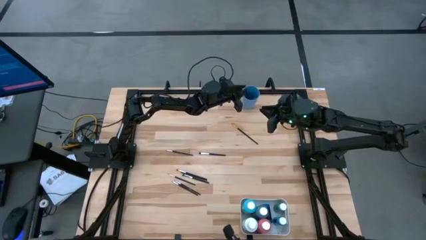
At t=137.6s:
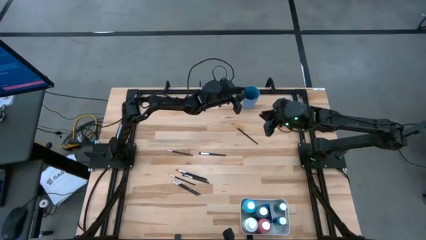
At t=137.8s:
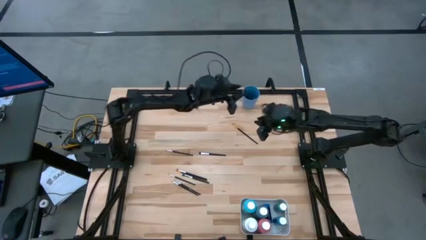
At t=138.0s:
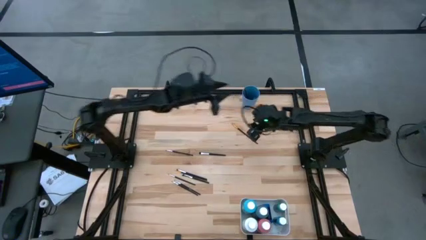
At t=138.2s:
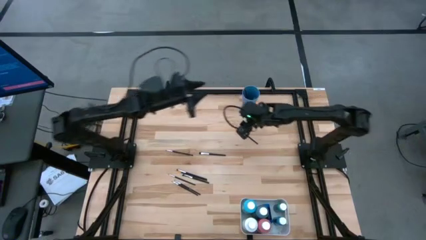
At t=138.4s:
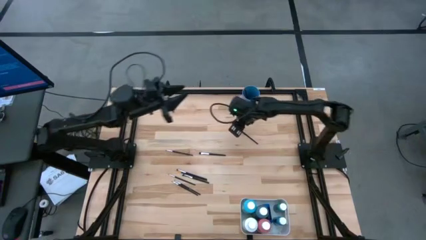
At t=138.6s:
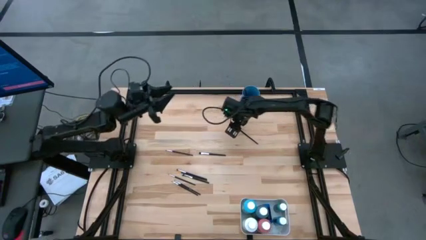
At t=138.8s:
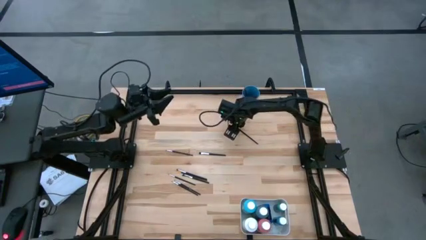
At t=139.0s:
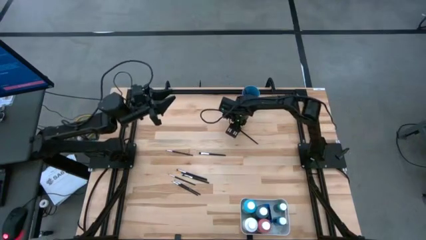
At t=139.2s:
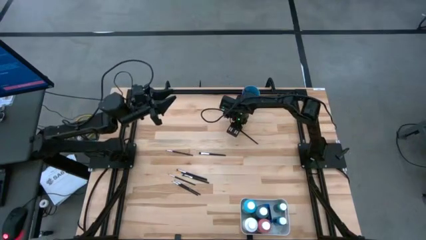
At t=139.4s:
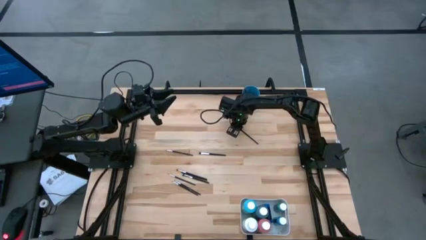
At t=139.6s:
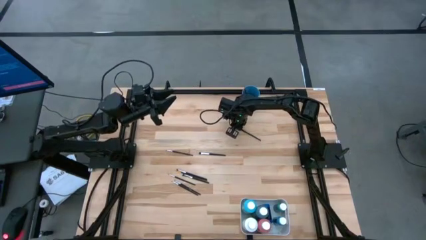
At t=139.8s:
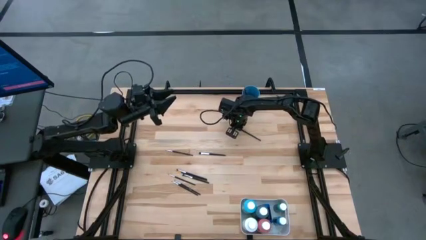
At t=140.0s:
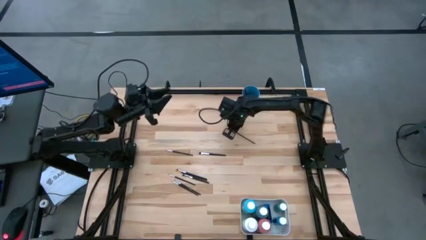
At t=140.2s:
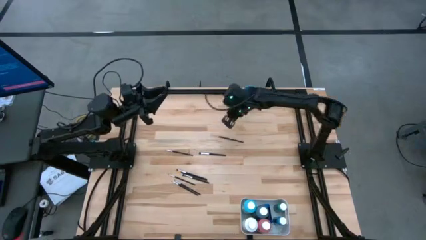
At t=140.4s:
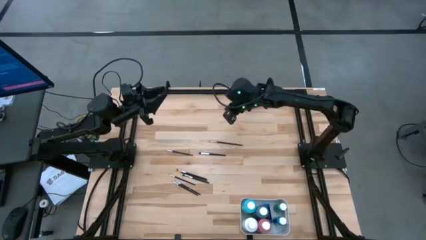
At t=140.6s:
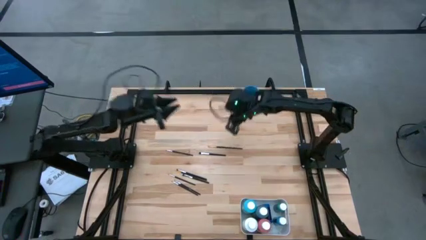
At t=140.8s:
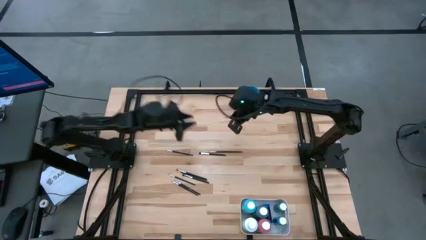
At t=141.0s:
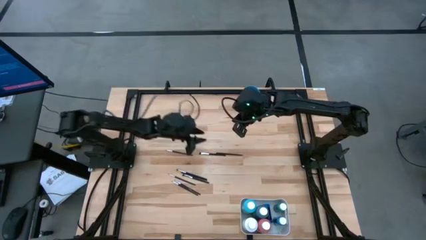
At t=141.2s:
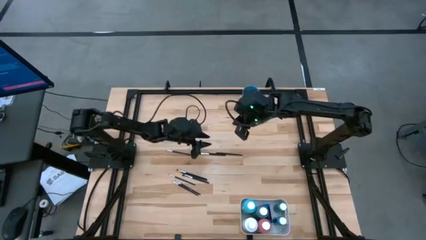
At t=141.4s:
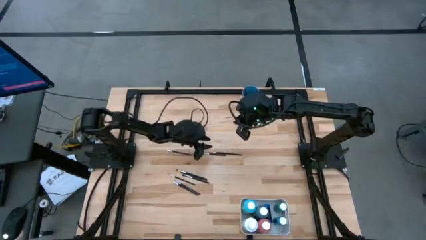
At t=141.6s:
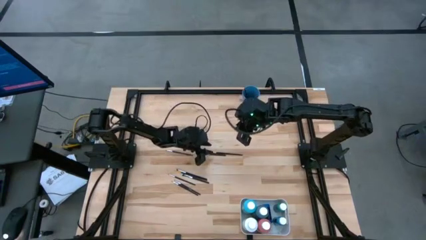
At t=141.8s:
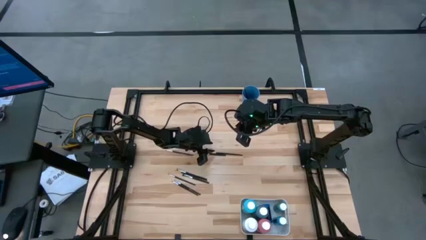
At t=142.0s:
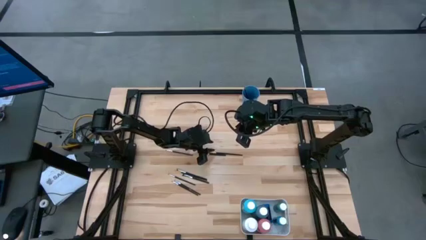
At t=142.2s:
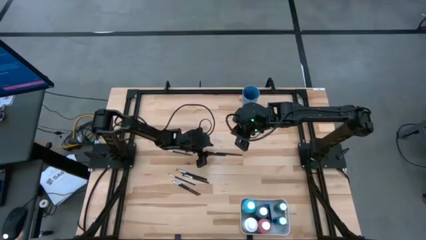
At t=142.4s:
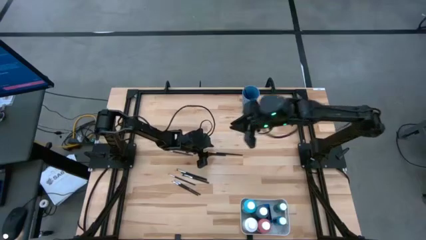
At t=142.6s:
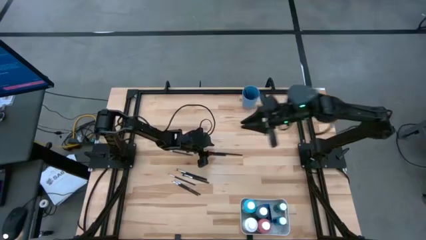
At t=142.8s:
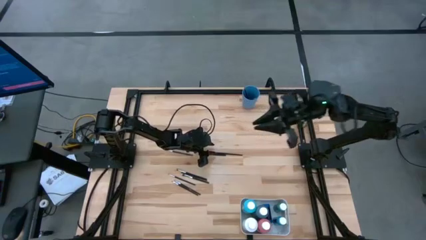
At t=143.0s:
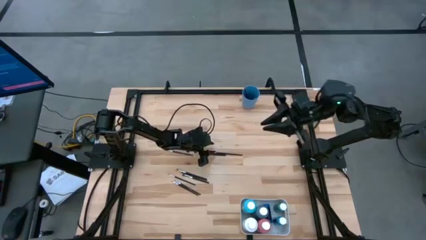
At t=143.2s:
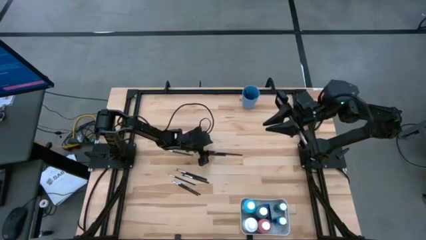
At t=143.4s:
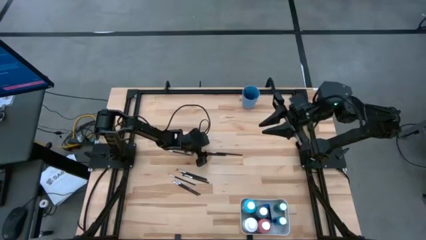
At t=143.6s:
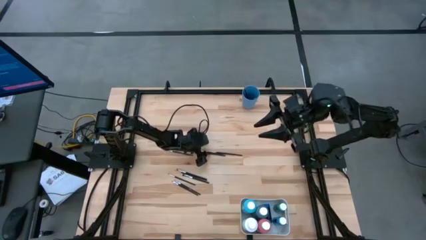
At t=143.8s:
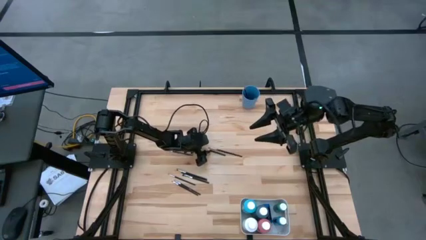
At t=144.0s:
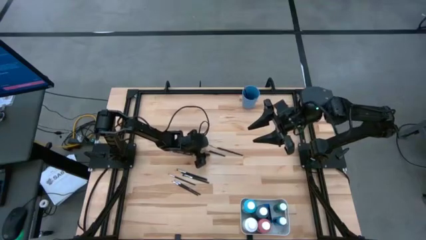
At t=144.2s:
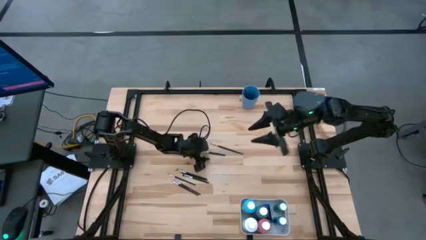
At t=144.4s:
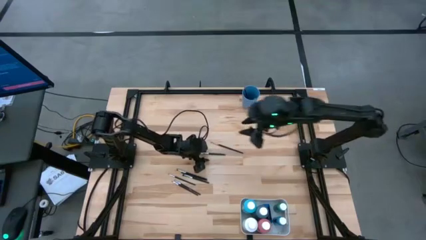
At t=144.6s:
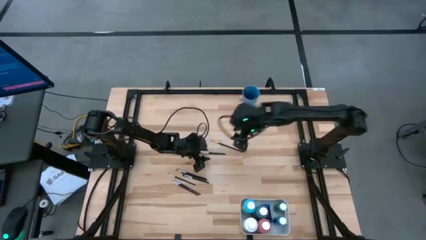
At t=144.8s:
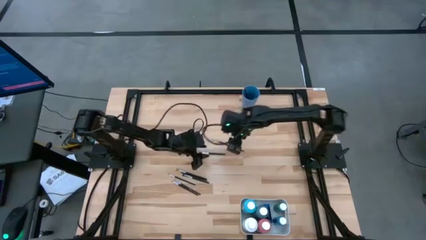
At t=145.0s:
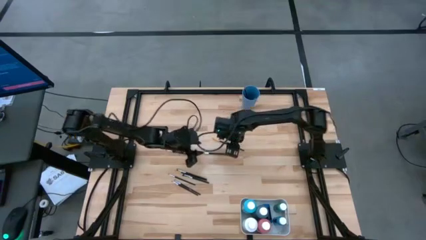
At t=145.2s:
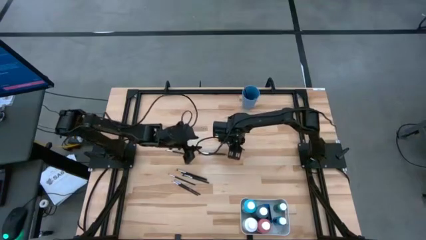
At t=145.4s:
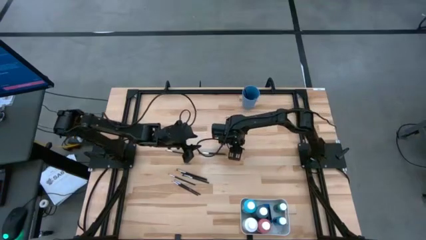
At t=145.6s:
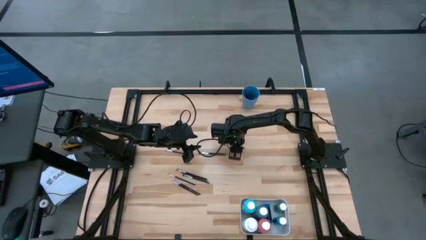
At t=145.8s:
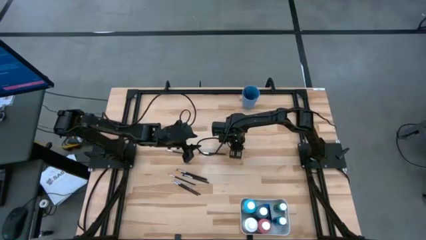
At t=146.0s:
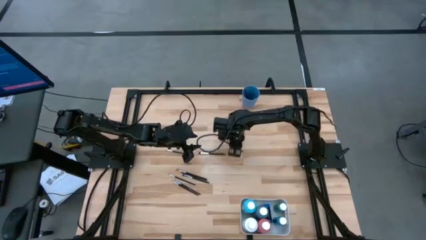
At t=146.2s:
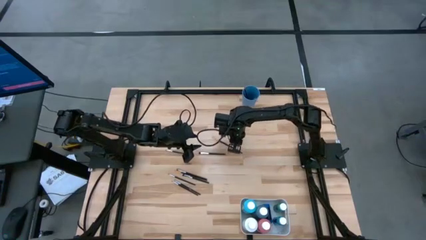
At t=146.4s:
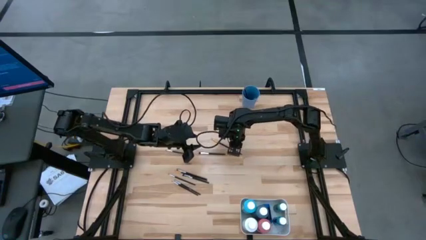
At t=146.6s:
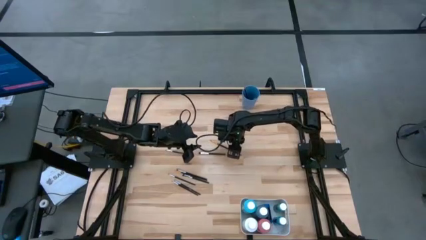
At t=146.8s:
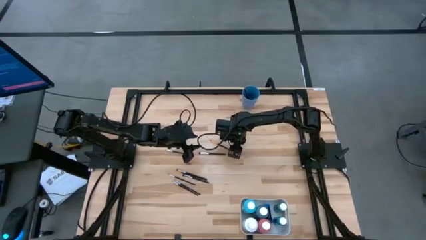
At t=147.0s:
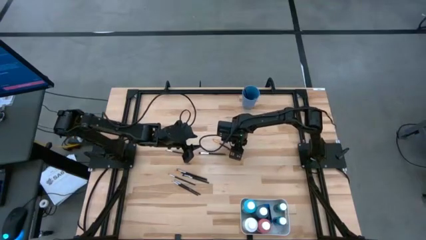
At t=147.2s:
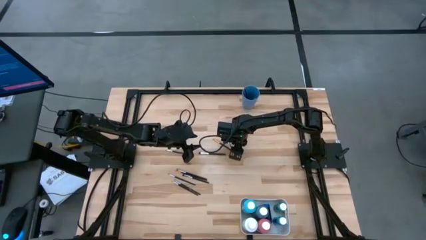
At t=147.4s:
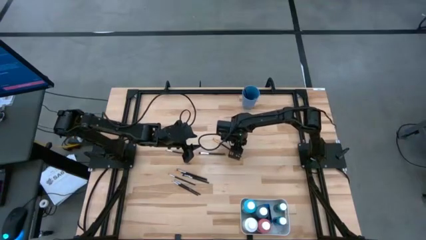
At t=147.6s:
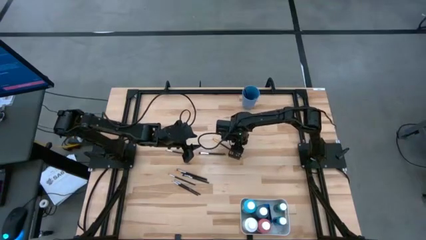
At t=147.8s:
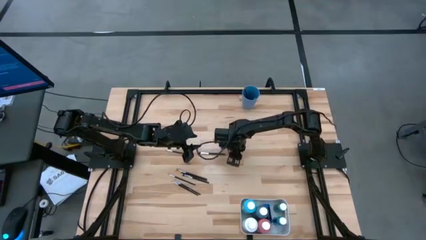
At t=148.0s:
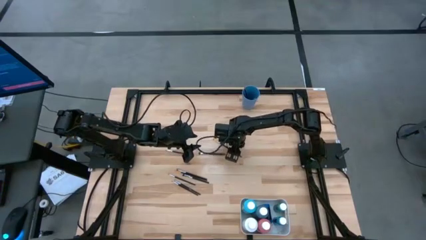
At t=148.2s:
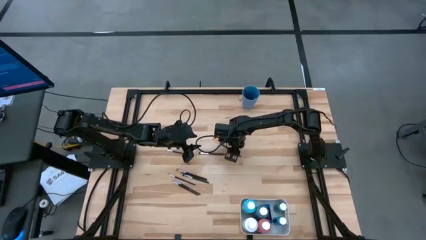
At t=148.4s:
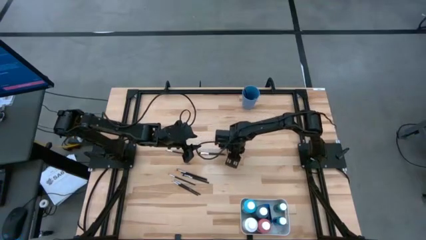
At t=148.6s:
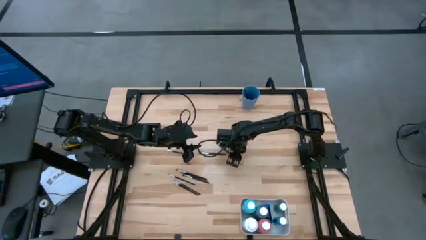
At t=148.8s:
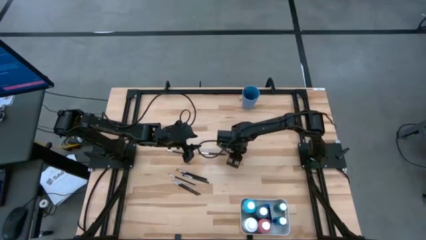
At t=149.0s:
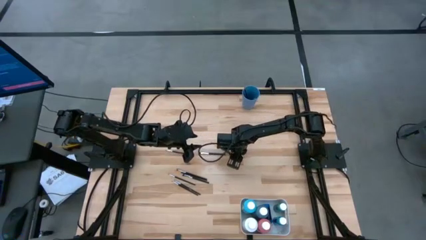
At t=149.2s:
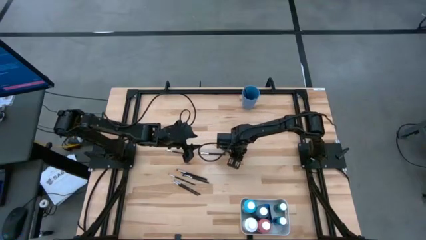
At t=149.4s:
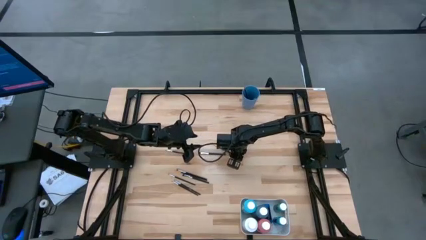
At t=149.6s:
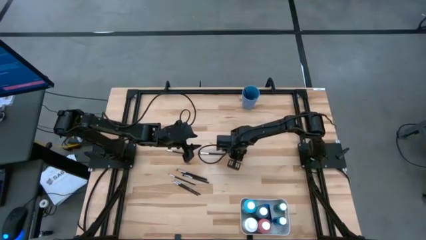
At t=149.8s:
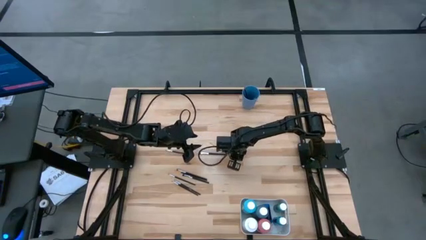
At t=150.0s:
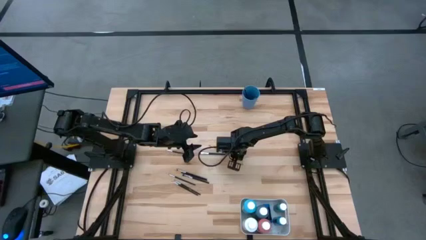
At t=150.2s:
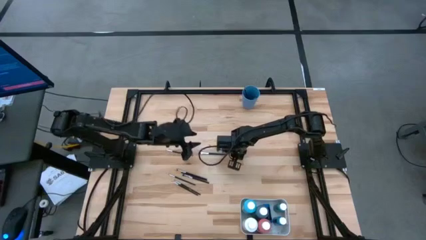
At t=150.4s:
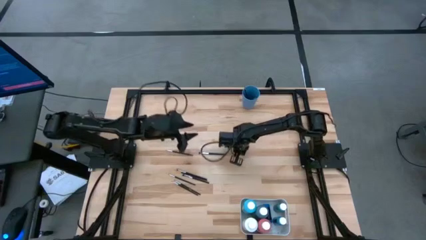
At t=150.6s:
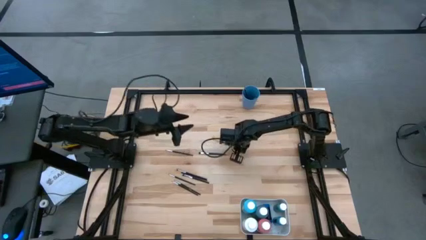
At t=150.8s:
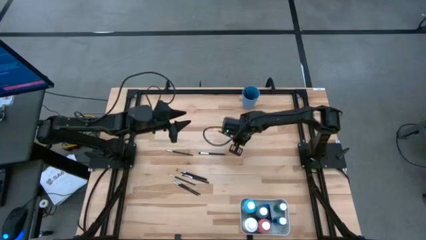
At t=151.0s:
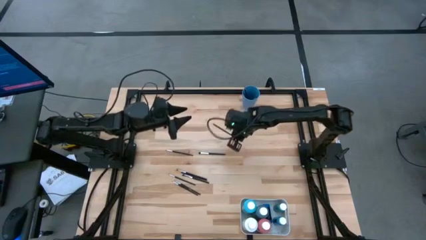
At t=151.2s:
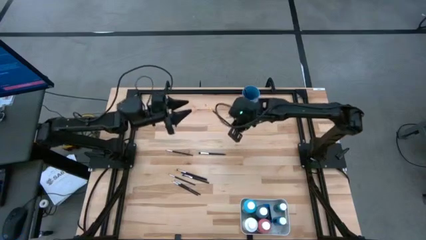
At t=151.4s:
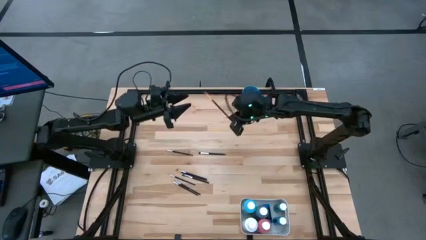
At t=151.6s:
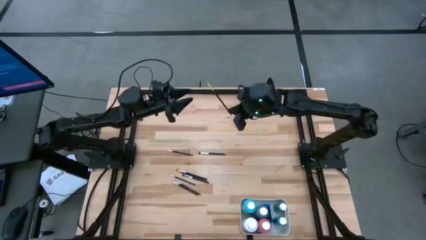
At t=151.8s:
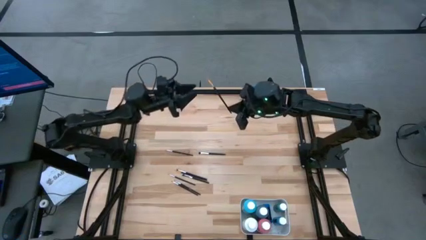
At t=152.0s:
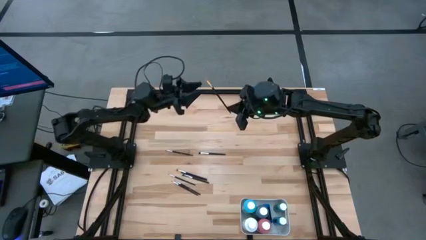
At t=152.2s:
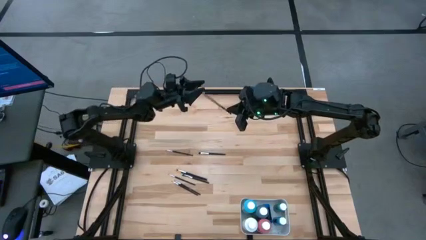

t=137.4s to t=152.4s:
Task: Pick & Place Paint Supplies
Put the orange paintbrush into the blue cup
